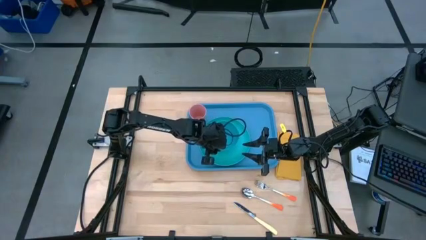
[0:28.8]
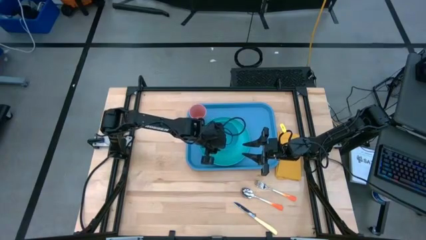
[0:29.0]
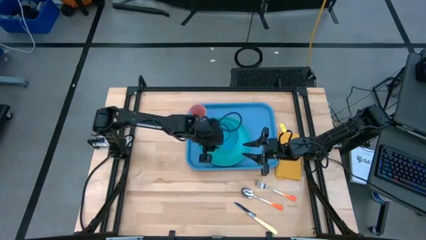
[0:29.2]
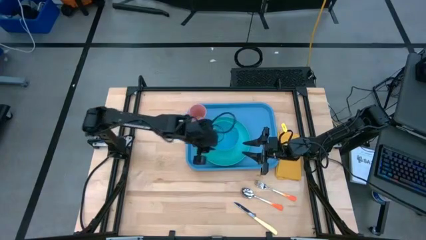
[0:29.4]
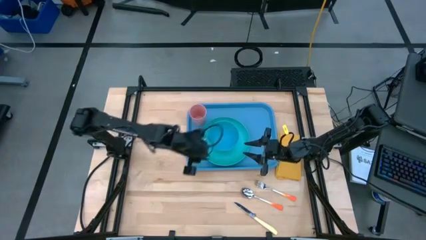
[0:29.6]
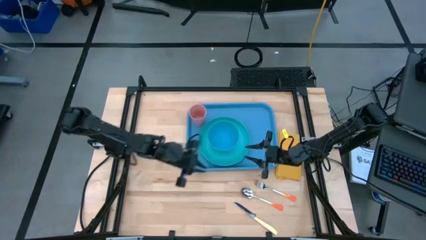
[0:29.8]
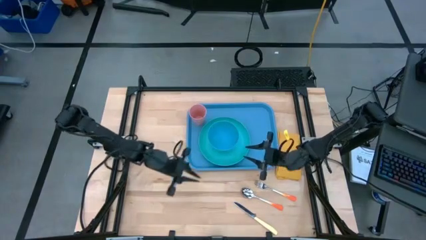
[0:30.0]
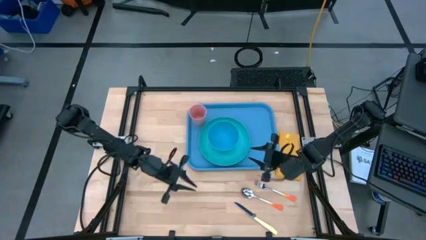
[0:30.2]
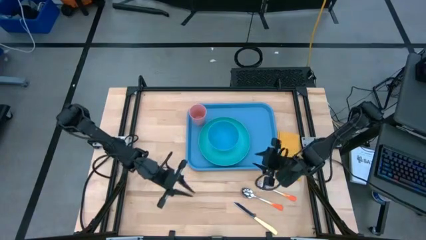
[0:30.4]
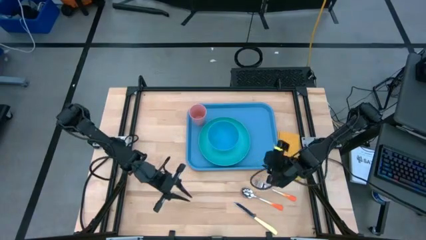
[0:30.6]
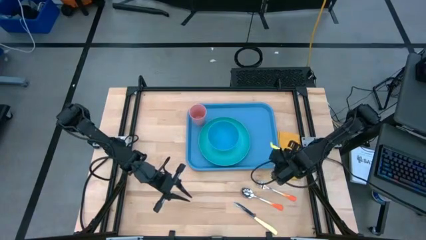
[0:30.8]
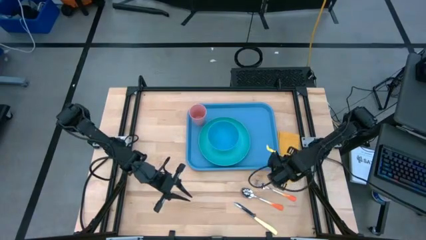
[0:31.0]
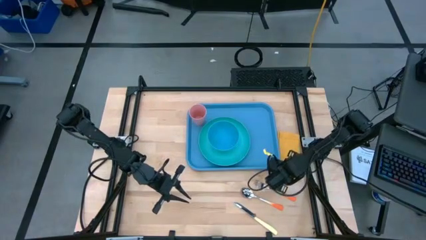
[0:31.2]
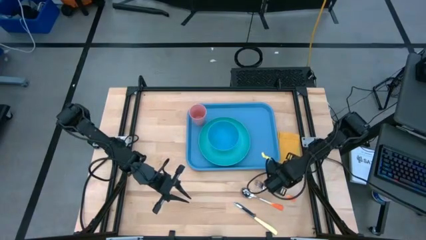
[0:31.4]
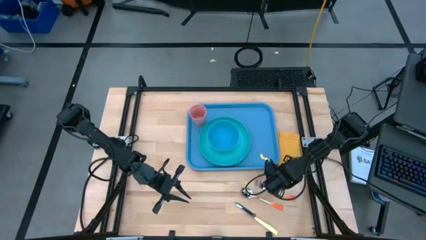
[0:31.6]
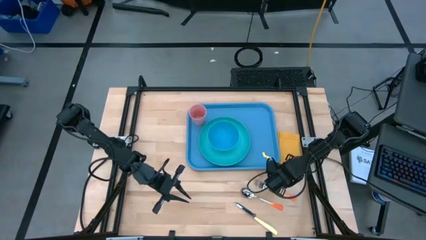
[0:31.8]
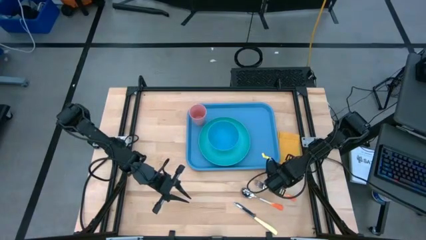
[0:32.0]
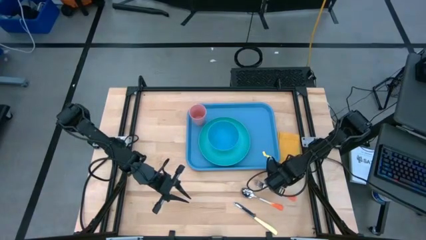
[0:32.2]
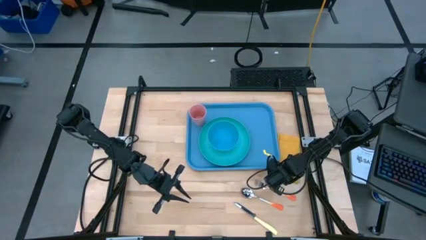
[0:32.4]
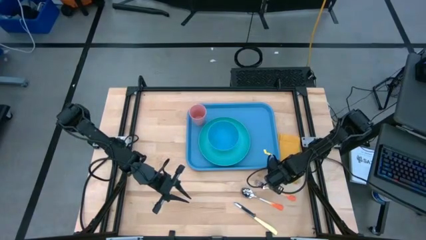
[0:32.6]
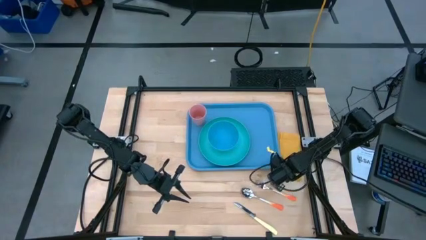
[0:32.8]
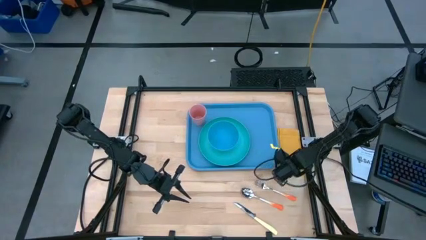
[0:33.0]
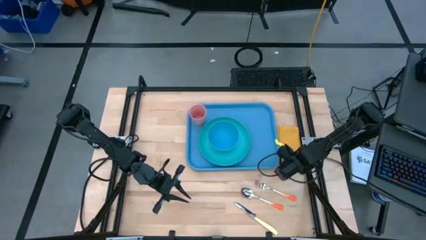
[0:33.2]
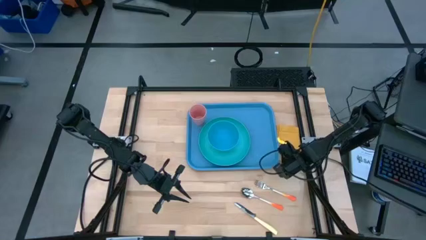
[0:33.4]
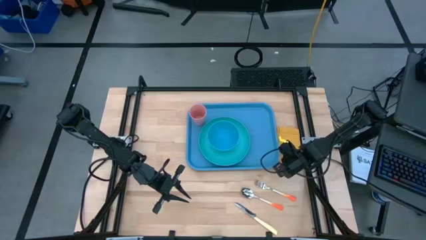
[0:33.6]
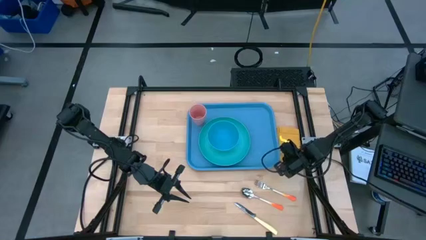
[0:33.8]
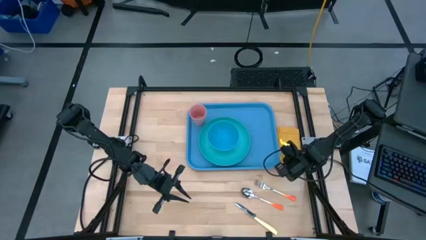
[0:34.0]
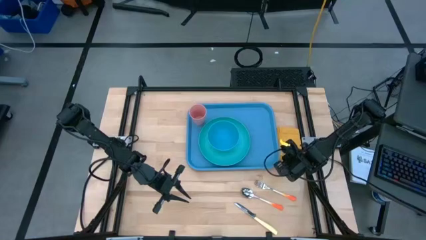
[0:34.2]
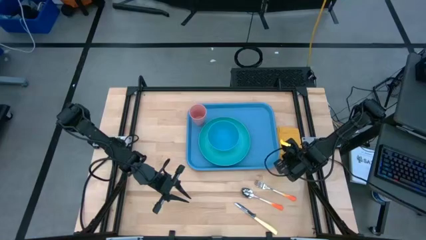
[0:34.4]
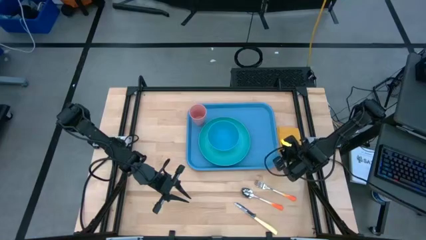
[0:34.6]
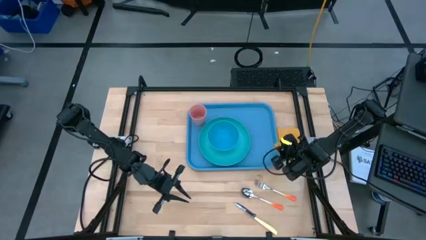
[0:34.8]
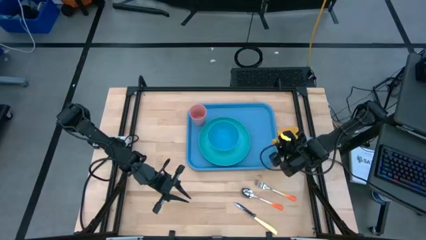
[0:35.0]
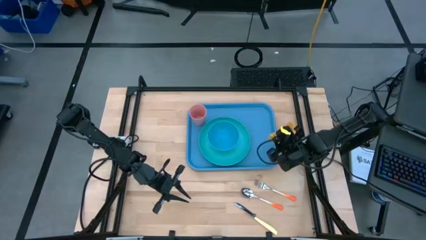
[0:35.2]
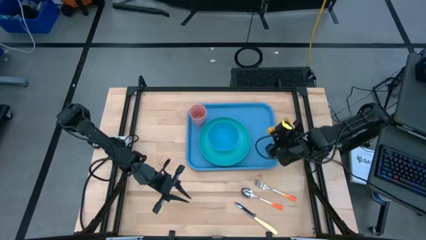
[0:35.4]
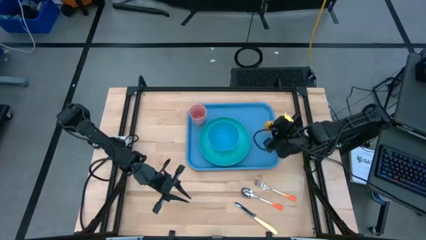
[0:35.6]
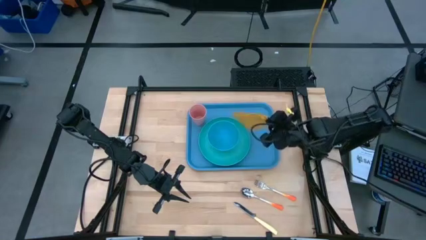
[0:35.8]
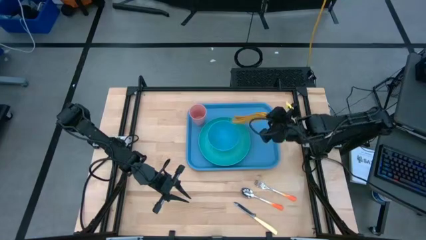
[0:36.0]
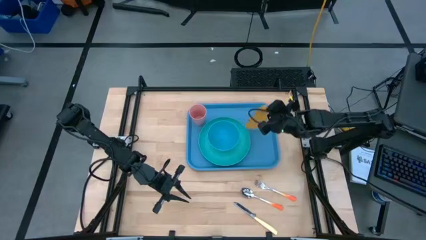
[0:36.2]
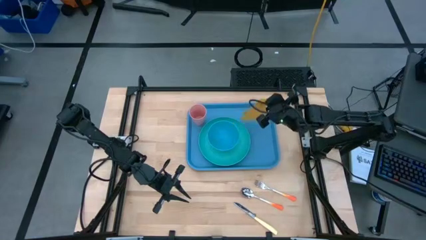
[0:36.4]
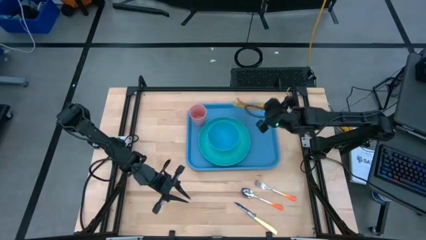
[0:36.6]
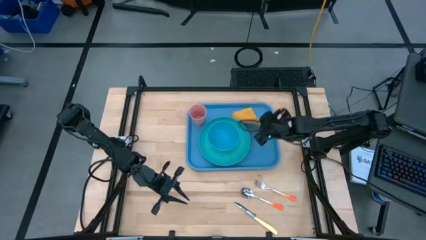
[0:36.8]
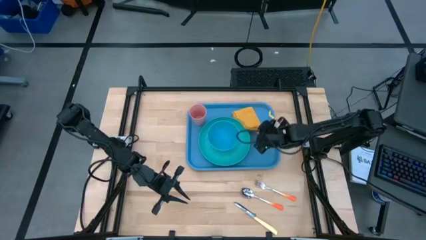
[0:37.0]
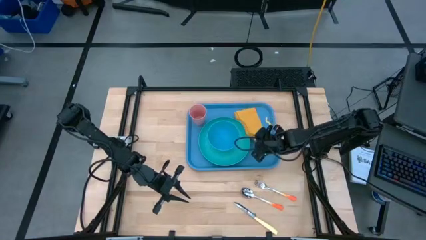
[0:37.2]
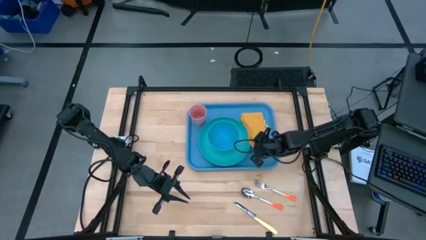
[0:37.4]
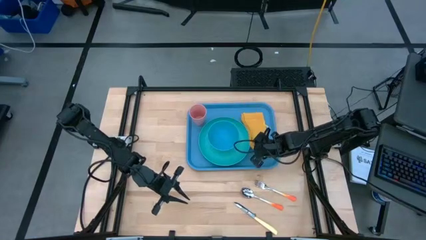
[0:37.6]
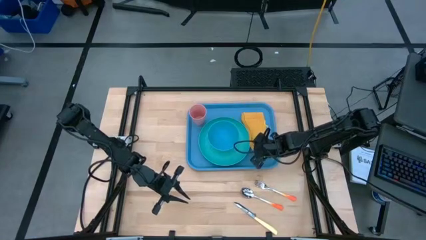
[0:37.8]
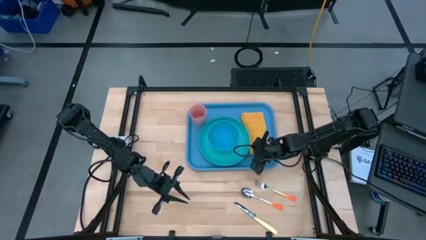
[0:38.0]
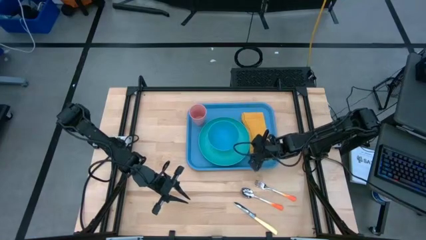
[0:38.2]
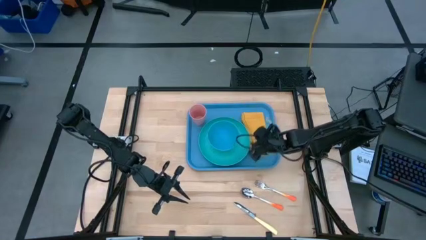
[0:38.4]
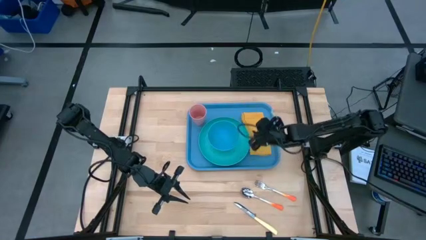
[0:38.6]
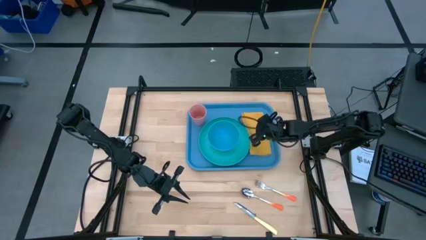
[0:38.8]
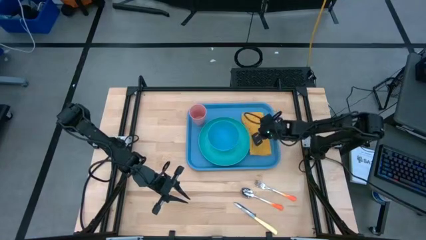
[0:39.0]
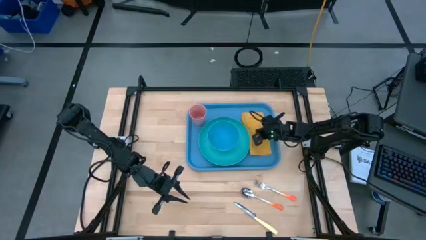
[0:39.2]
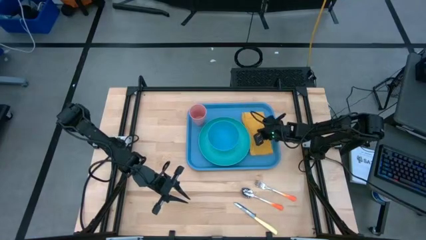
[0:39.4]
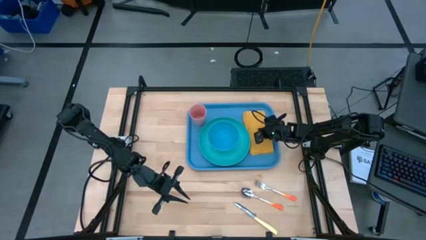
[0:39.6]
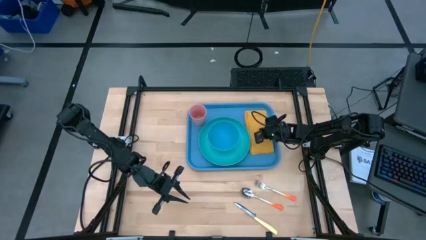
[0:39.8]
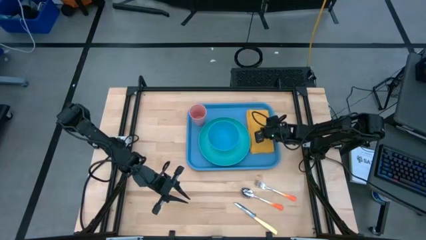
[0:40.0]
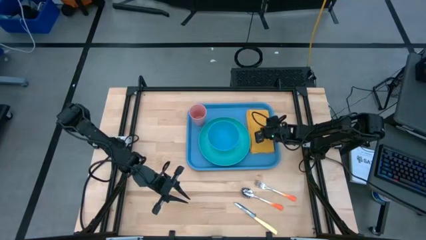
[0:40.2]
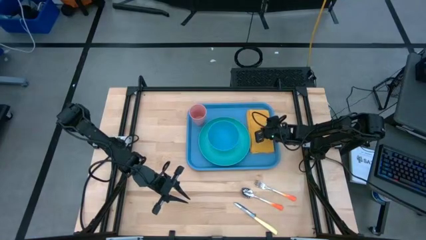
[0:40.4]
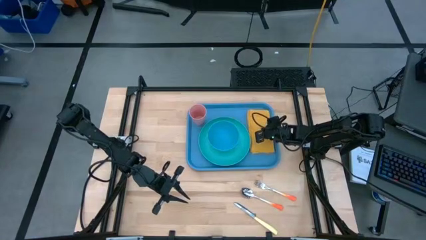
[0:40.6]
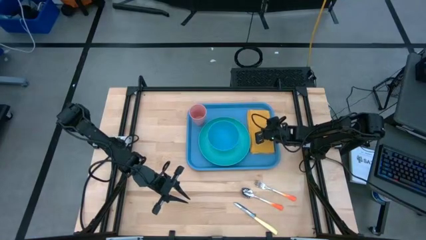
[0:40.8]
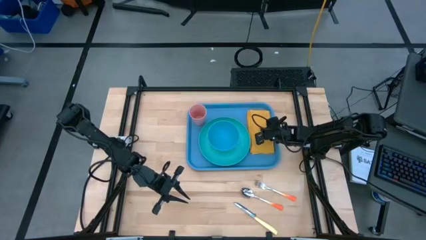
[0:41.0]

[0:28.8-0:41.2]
Task: Set up tray
Put the yellow napkin on the blue serving tray to the right of the blue plate
